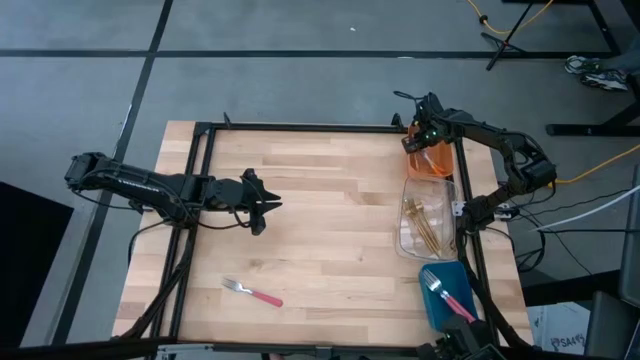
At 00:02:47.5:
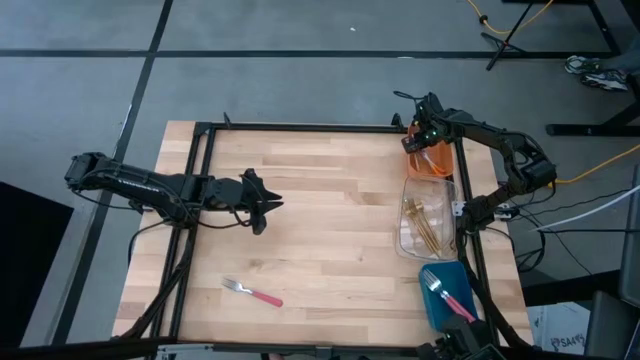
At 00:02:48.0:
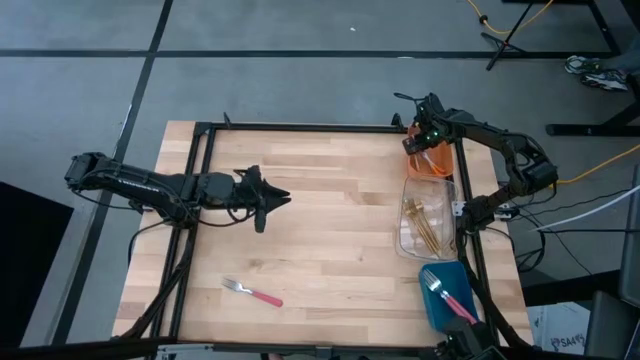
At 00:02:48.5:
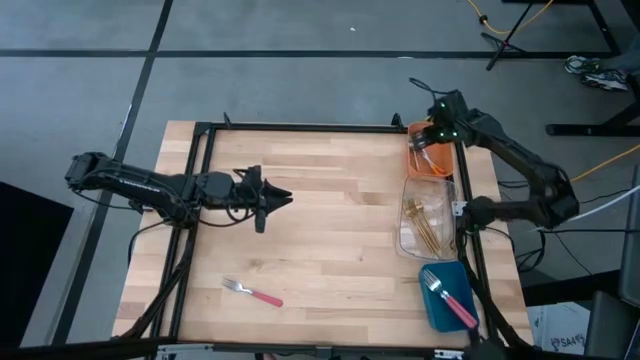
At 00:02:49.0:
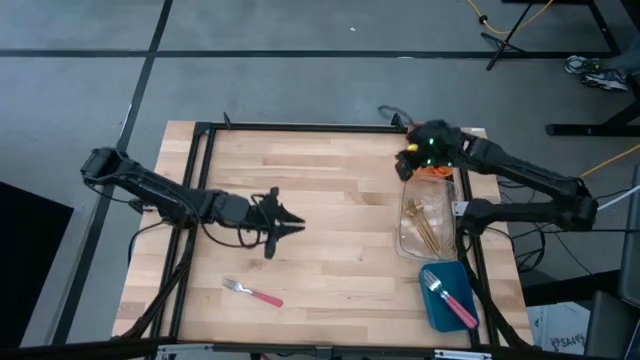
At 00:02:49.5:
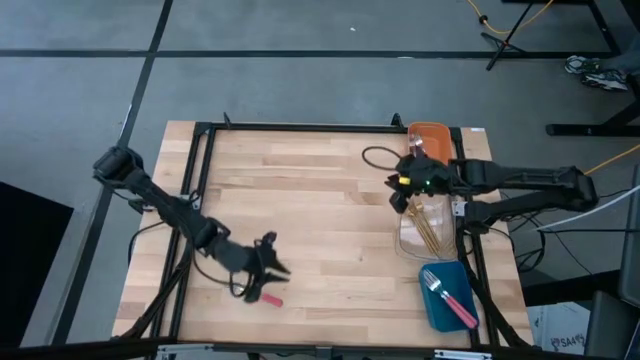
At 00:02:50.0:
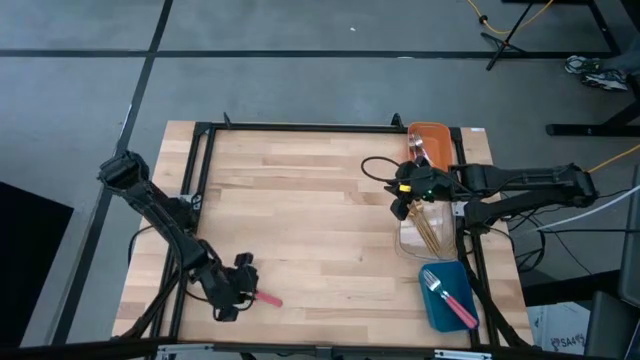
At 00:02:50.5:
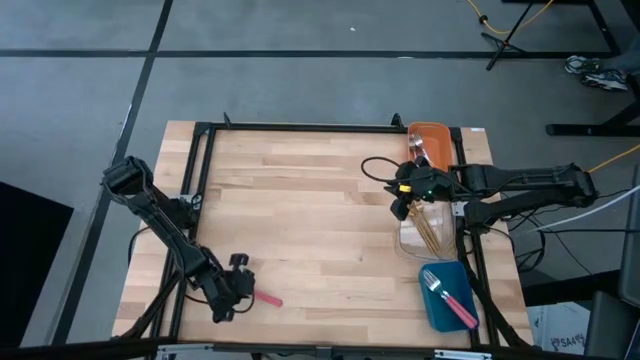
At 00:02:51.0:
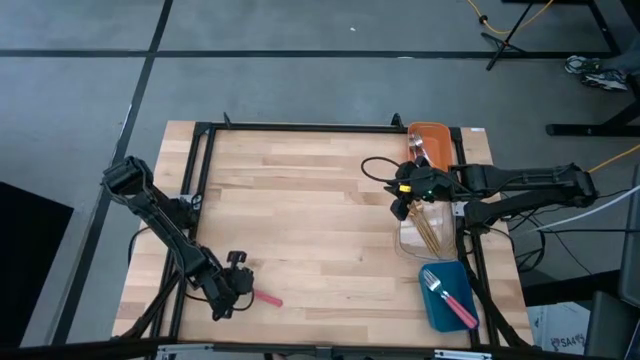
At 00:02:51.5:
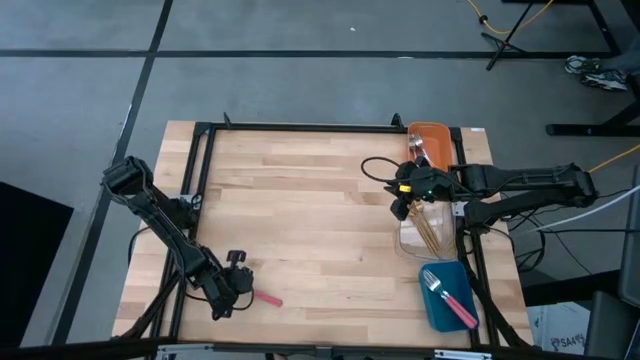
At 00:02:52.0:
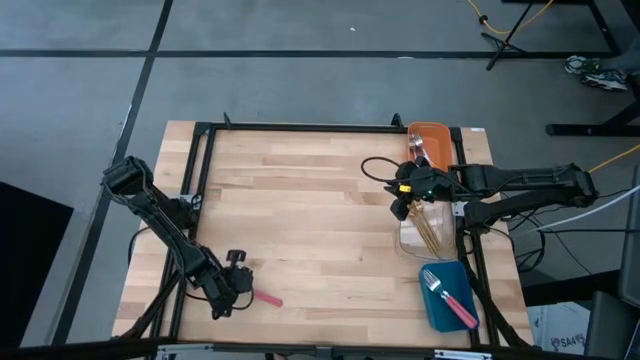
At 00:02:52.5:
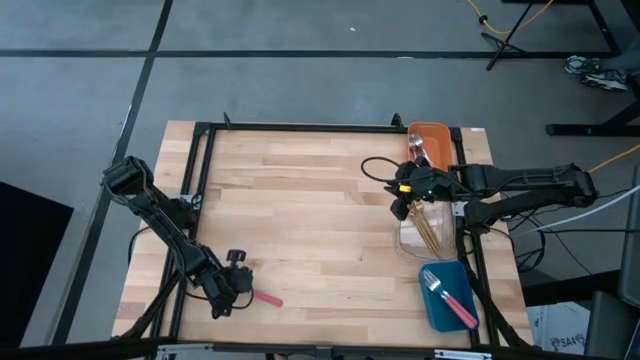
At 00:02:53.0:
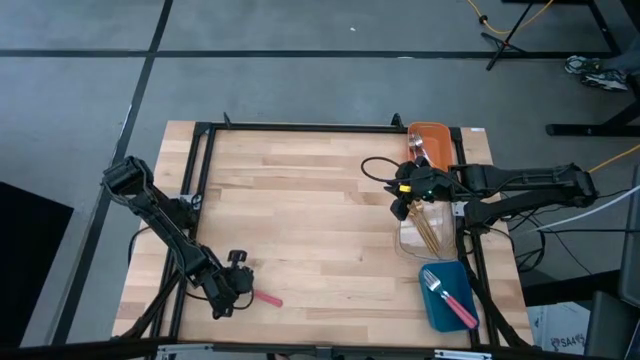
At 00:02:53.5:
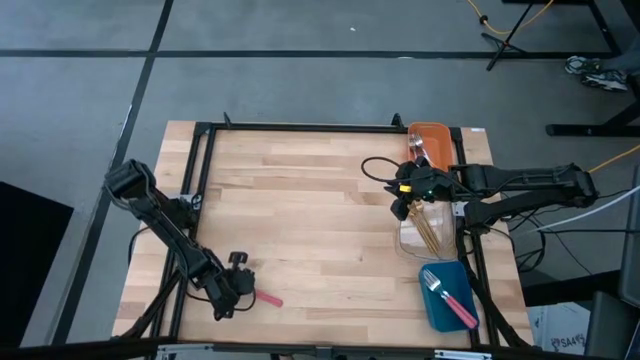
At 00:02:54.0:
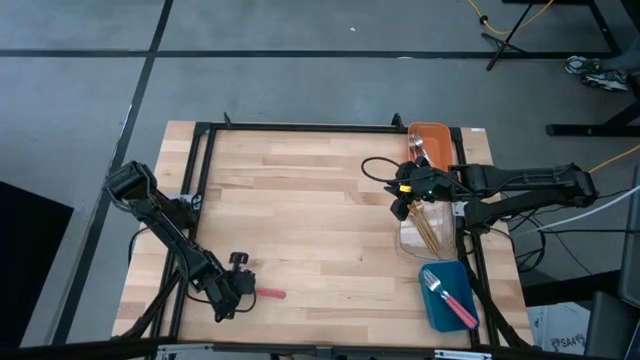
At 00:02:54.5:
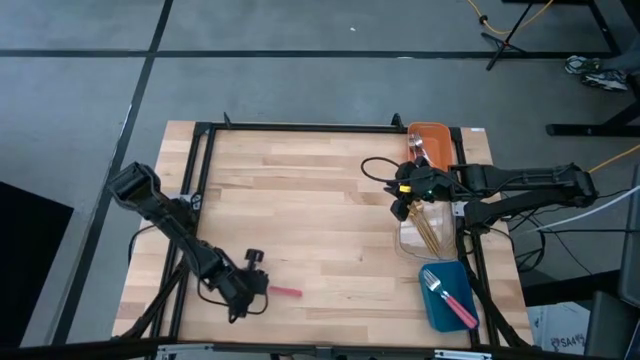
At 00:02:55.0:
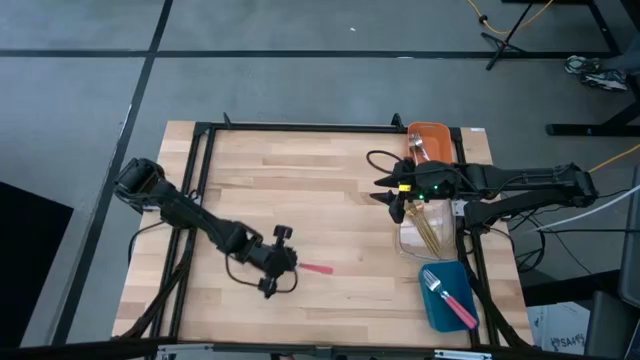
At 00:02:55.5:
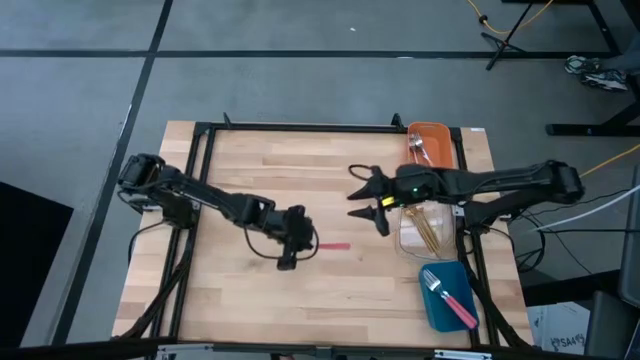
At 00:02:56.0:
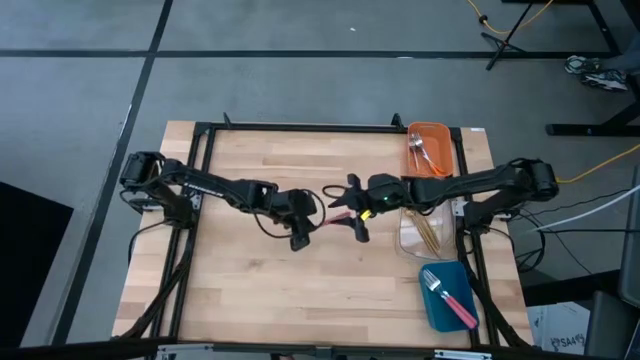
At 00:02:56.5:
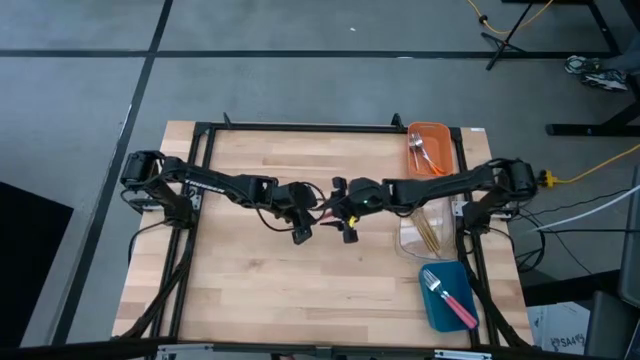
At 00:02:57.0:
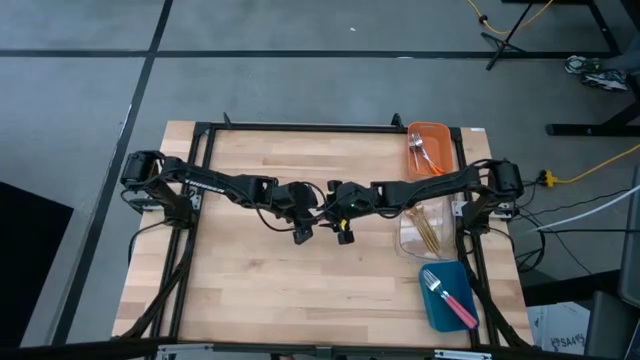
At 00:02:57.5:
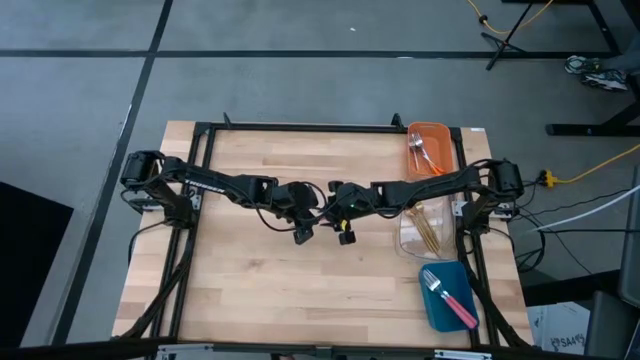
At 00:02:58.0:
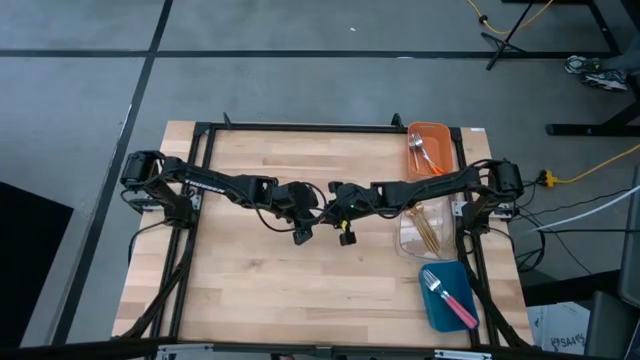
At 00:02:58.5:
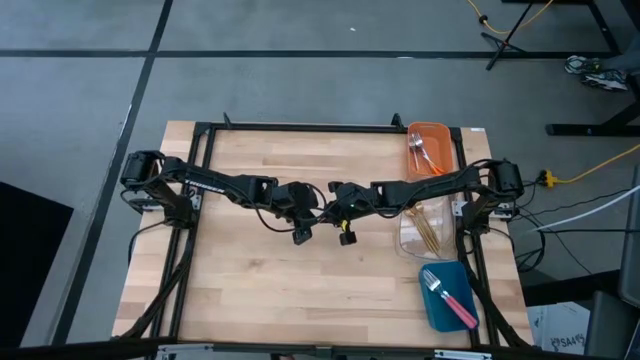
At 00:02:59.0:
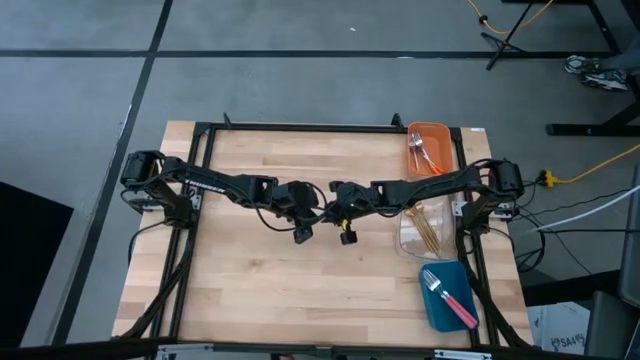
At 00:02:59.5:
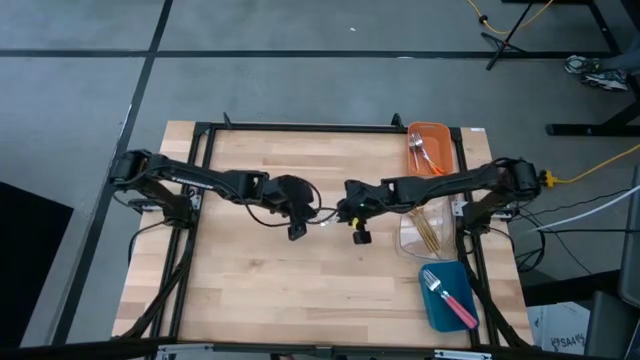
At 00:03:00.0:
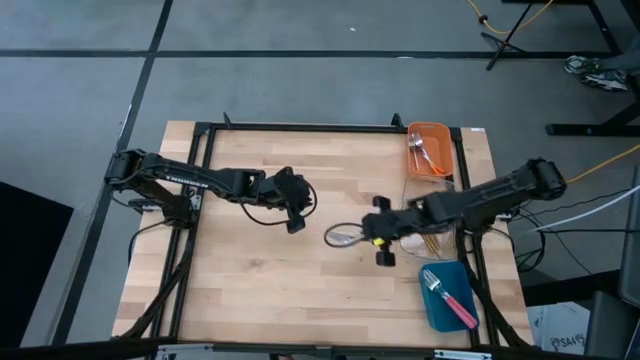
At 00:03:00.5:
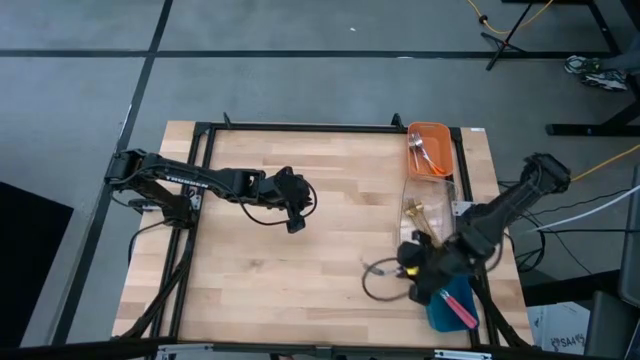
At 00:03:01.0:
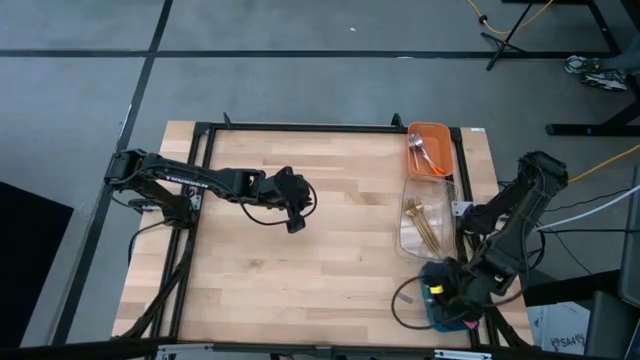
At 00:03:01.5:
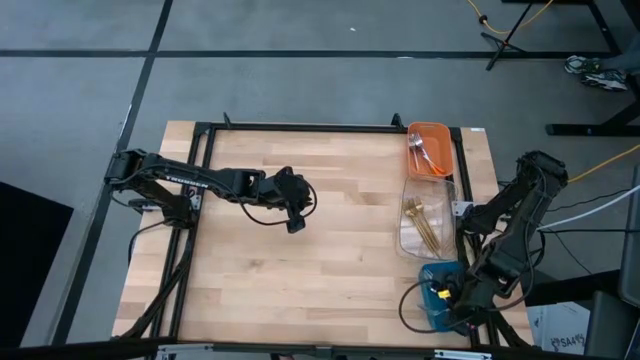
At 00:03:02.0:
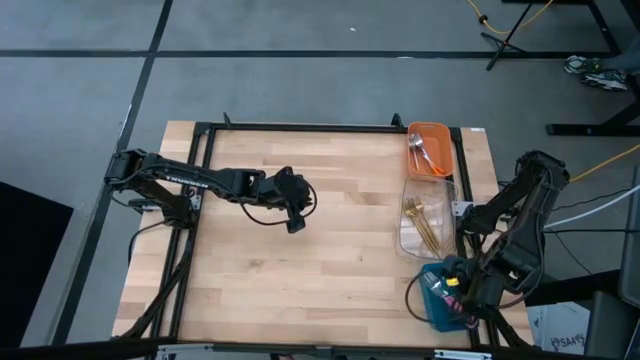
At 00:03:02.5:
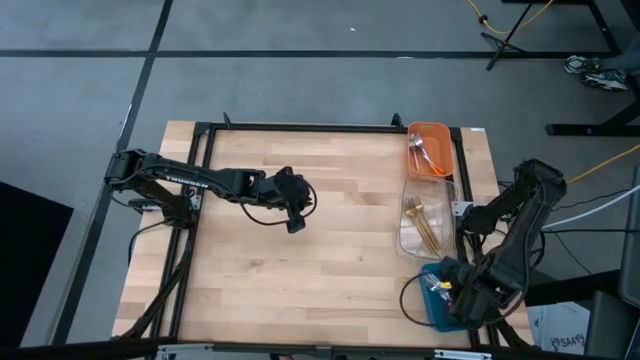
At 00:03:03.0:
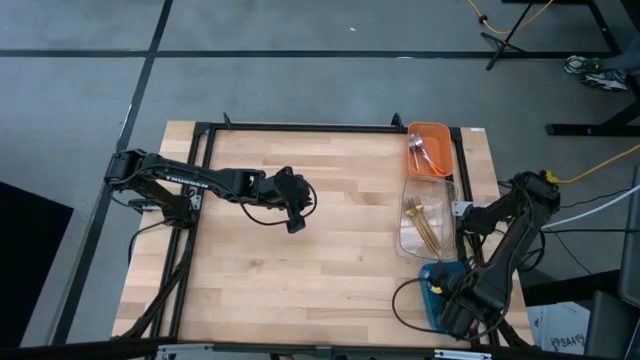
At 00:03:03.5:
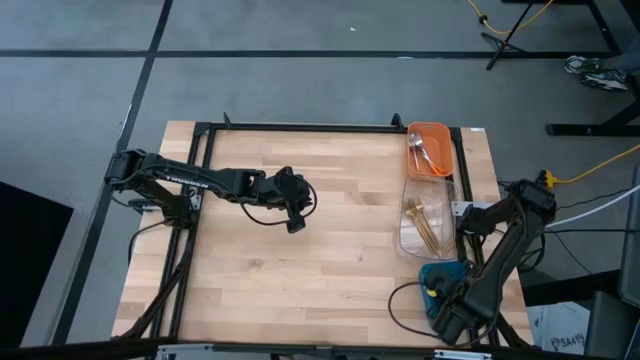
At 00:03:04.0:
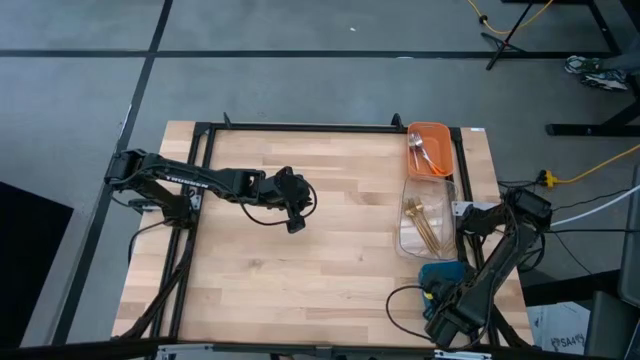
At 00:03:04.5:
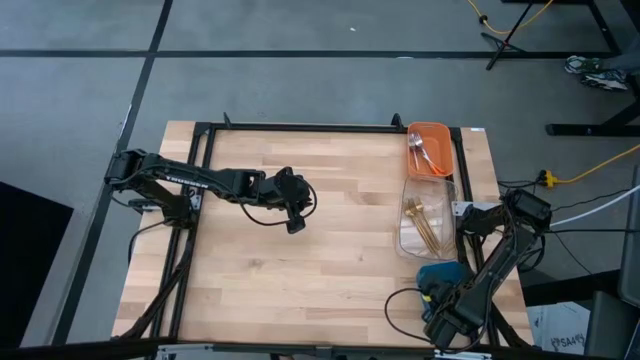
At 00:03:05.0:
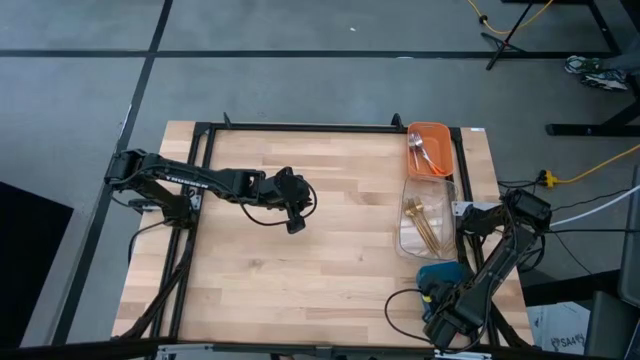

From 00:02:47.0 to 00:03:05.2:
Task: Sort silverware by color (type)
Put the pink fork into the blue bin
